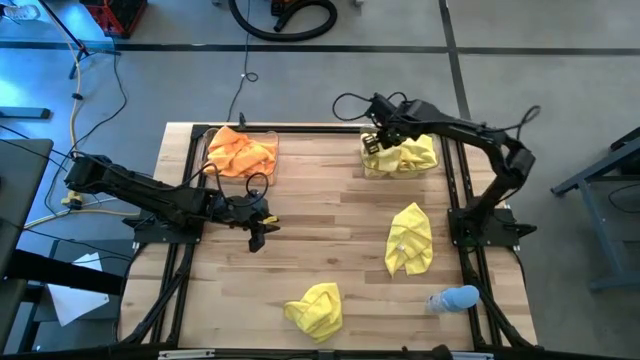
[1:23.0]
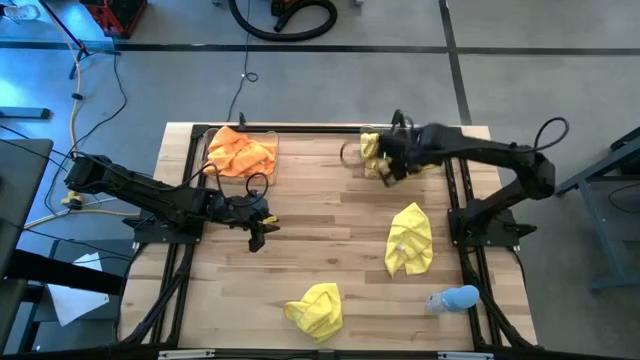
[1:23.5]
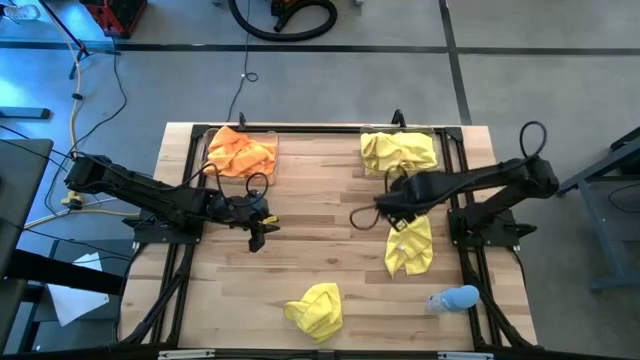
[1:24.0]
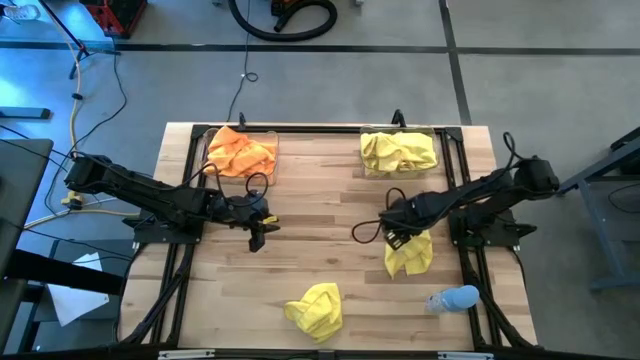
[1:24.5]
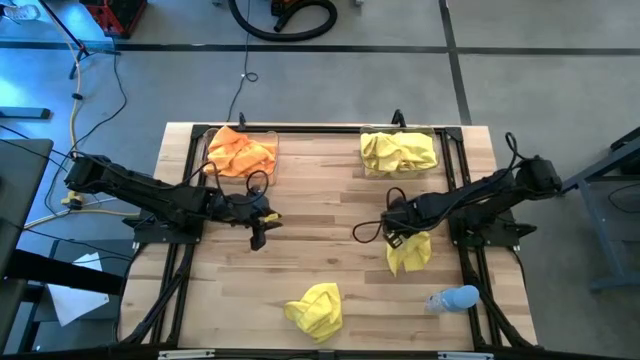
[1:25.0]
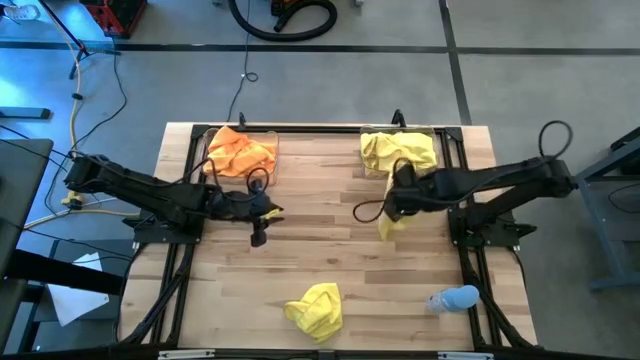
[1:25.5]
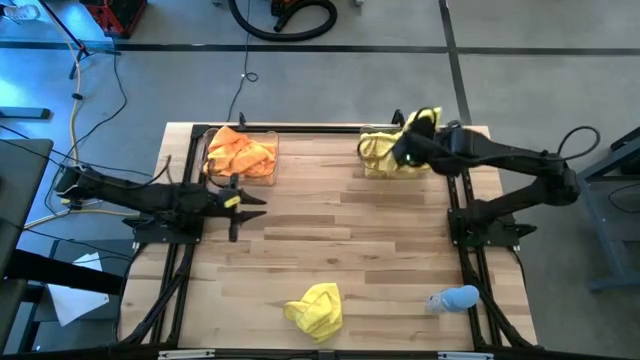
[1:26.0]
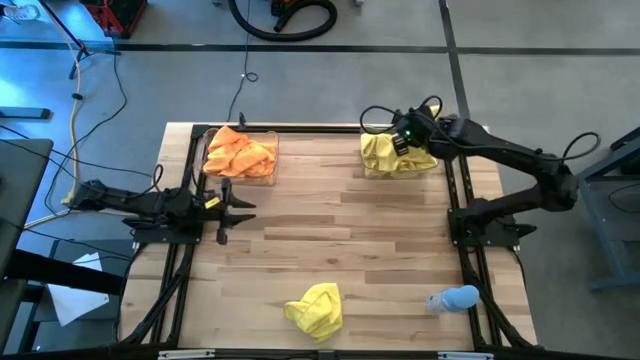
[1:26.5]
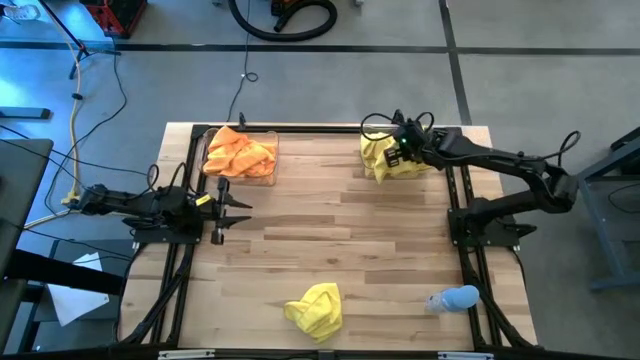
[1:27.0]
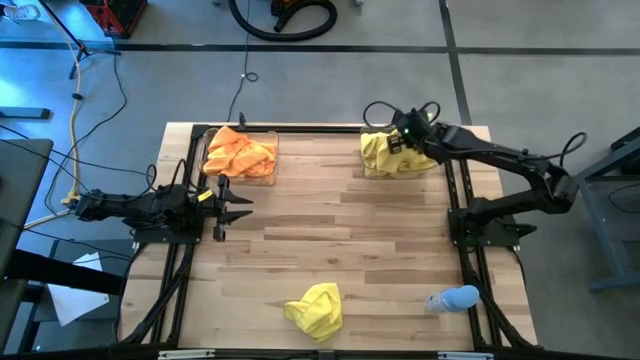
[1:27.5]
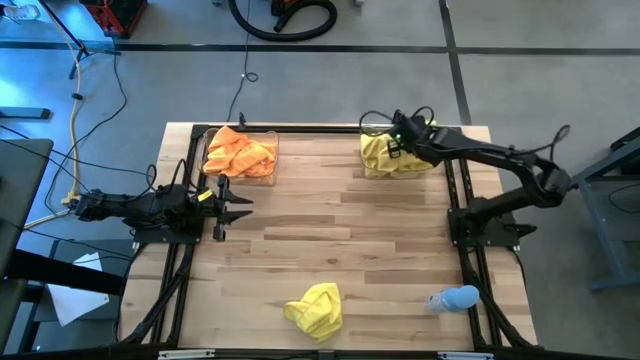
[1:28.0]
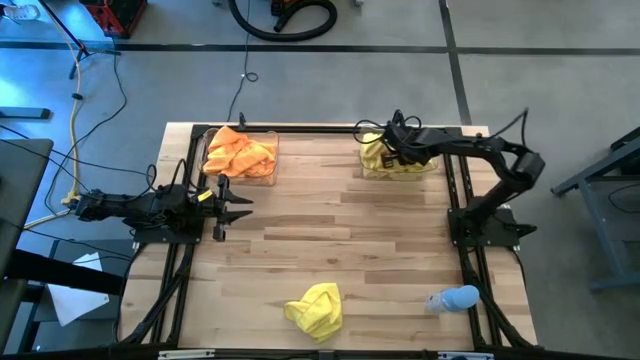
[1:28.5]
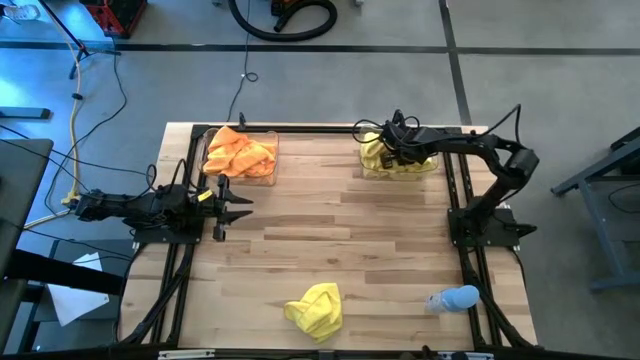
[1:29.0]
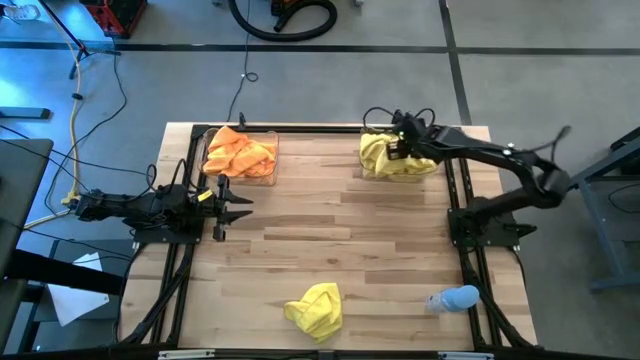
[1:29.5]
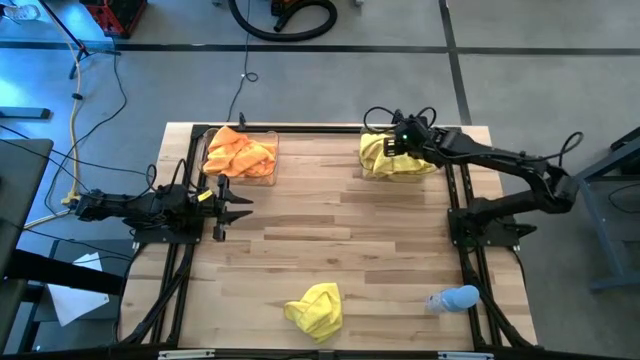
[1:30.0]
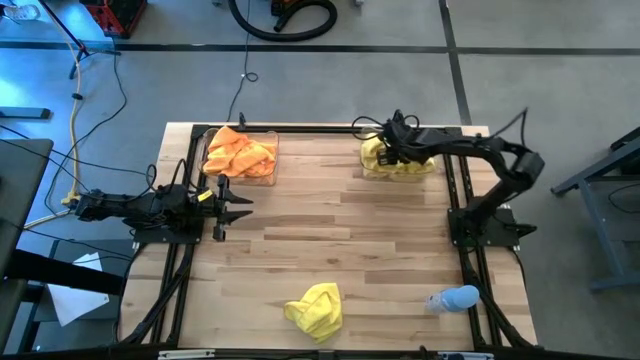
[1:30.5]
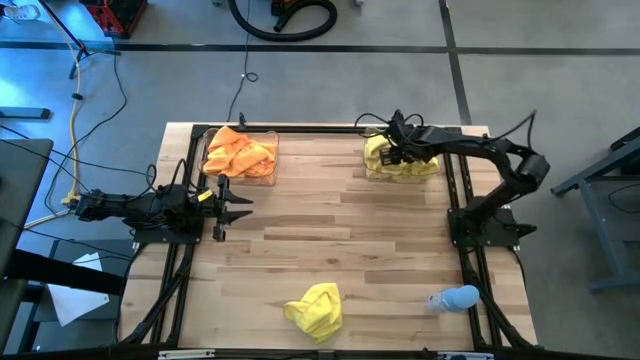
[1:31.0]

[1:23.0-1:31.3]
Task: Sort microfiber towel by color & place in baskets
Put the top yellow microfiber cloth into the right transparent bin

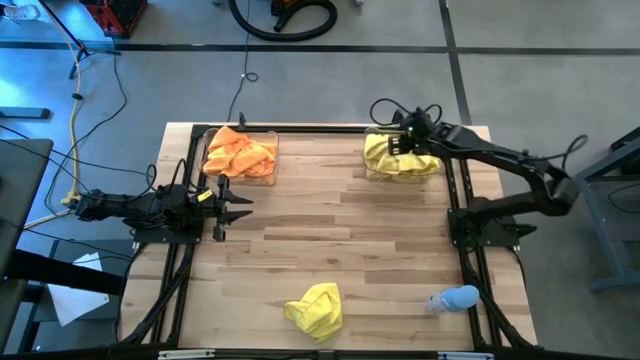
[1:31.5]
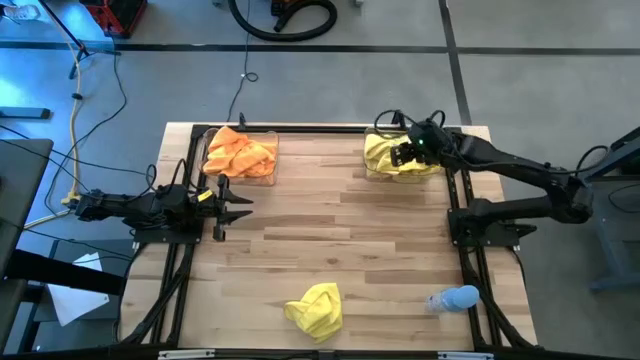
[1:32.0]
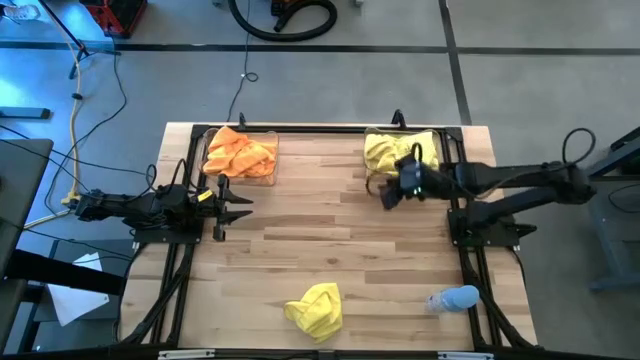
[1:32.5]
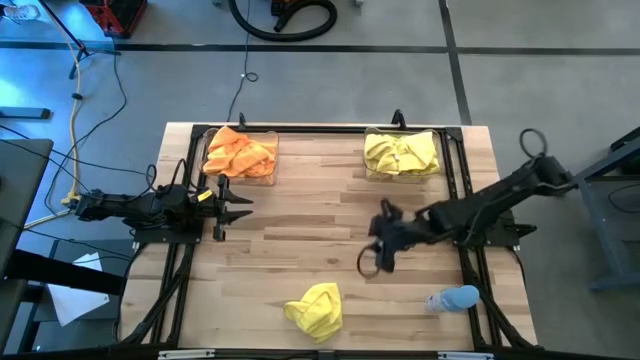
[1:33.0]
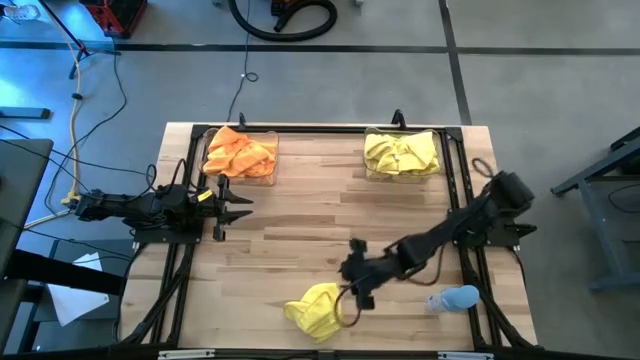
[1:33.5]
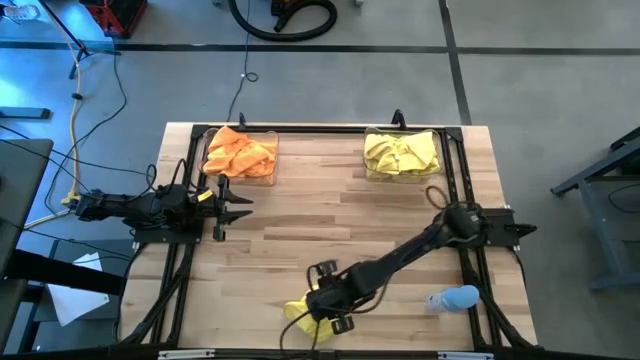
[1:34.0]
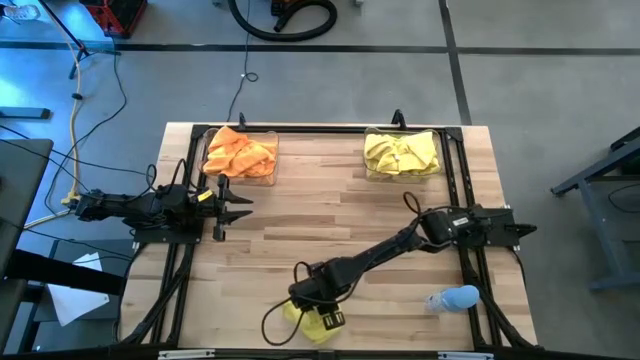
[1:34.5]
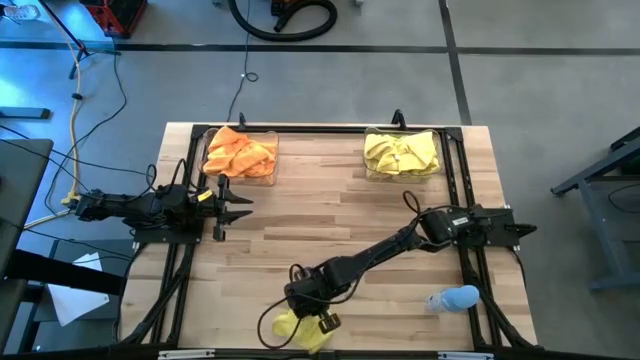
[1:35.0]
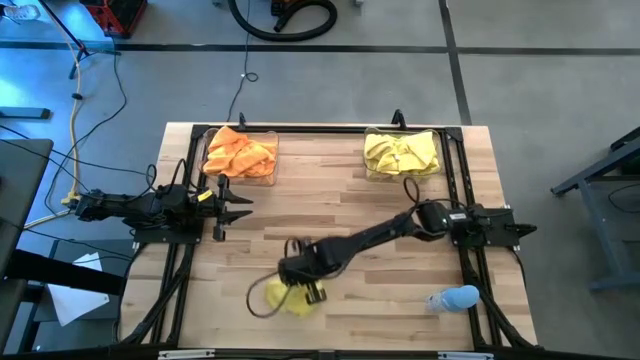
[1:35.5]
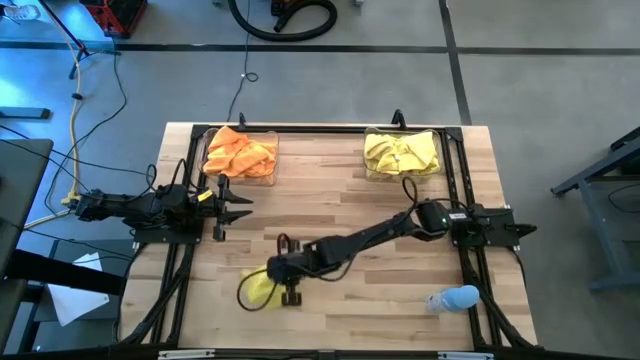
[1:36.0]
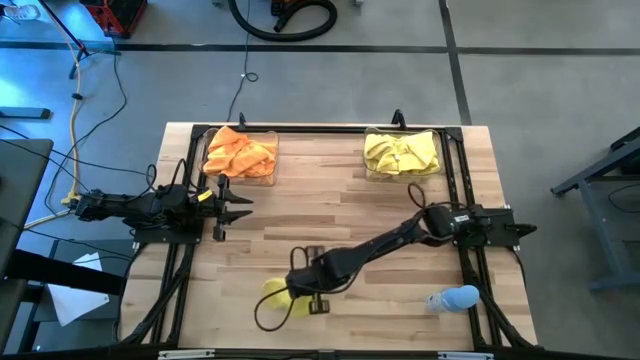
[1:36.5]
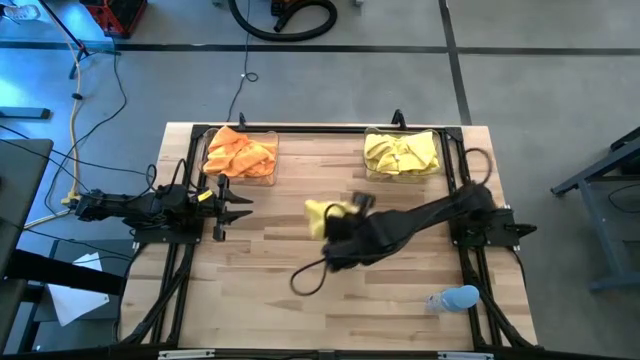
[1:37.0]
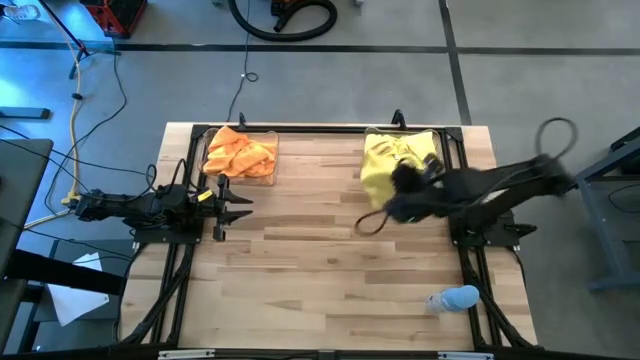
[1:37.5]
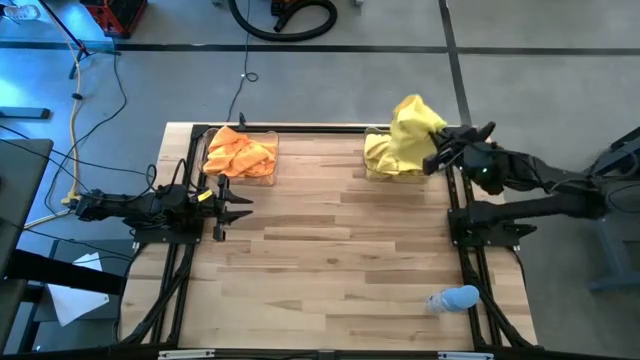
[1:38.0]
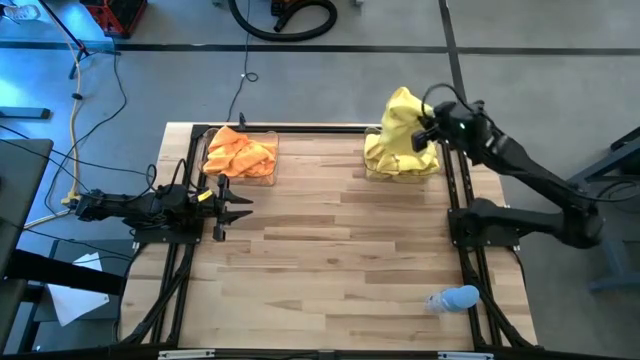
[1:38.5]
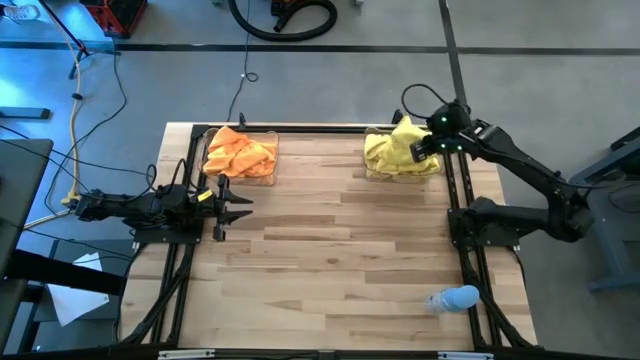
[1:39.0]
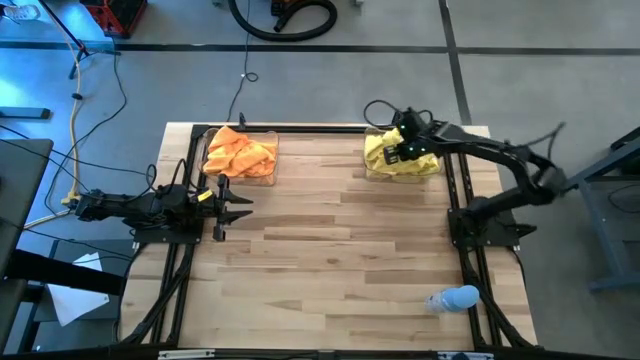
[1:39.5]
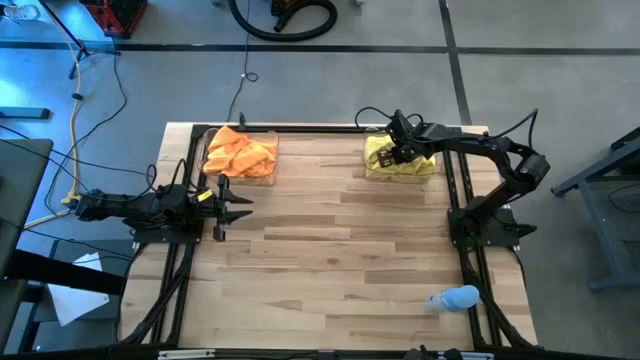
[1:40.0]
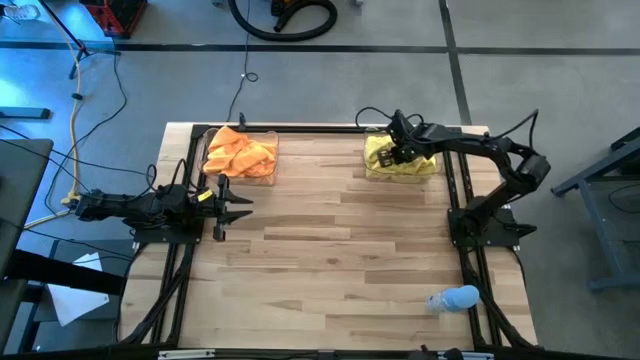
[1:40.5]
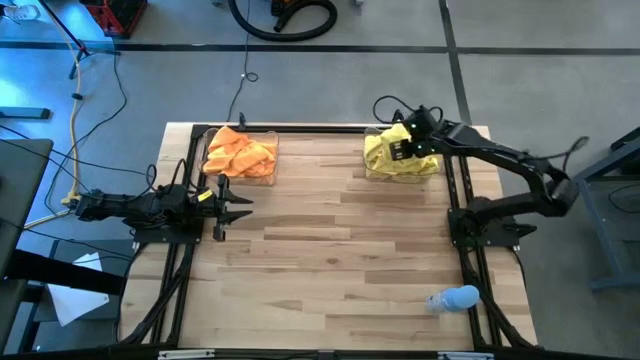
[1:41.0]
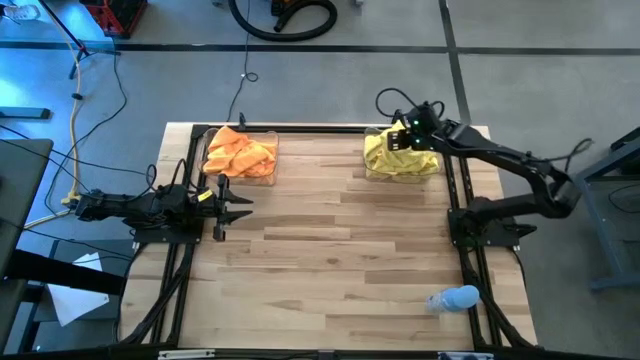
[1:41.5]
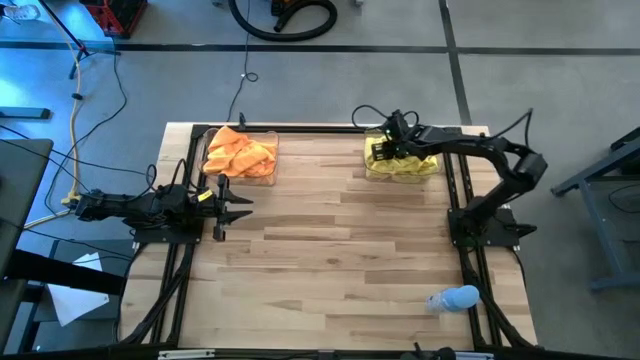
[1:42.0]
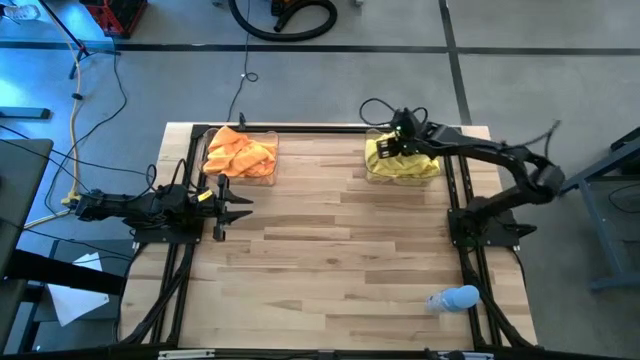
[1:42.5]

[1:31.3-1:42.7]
Put the yellow microfiber cloth into the right transparent bin

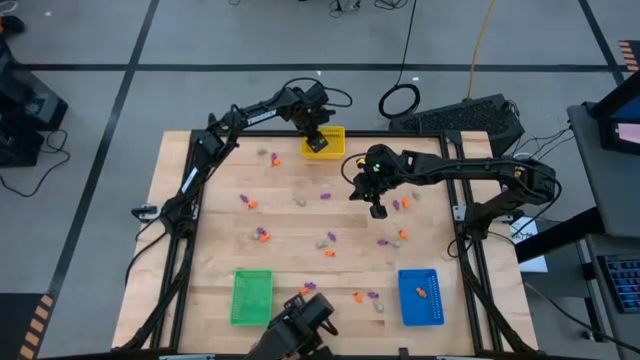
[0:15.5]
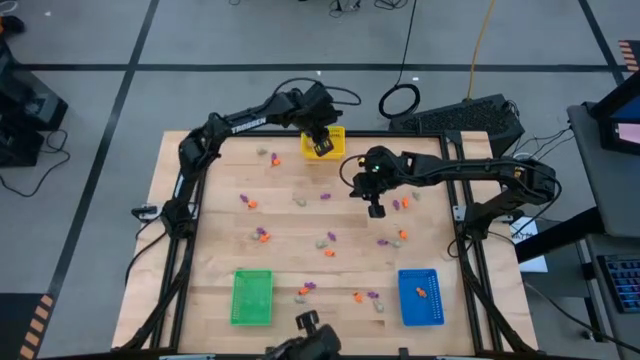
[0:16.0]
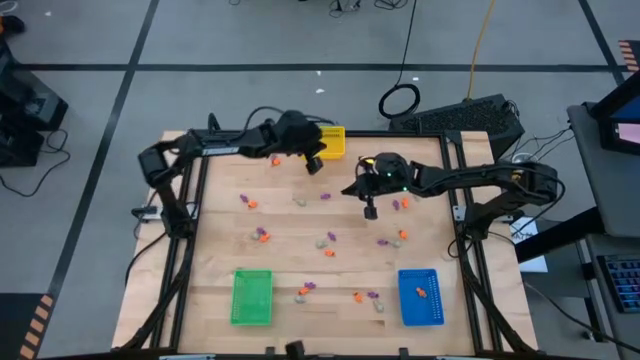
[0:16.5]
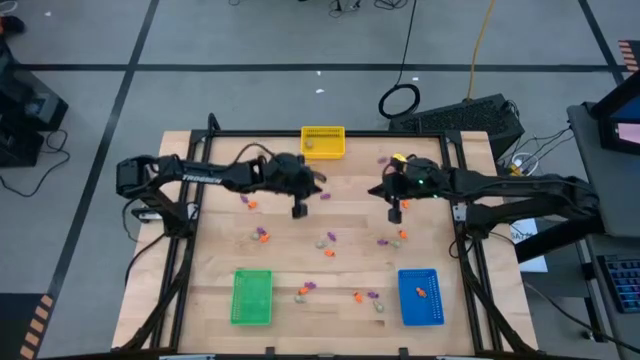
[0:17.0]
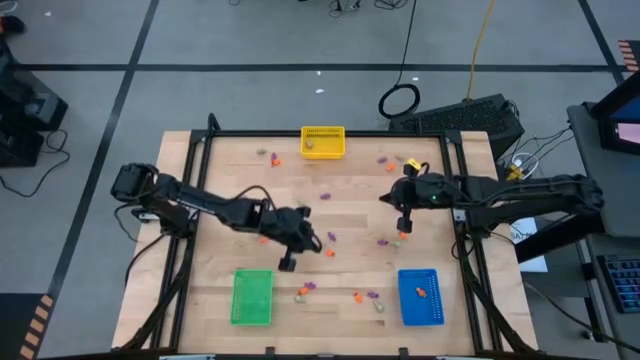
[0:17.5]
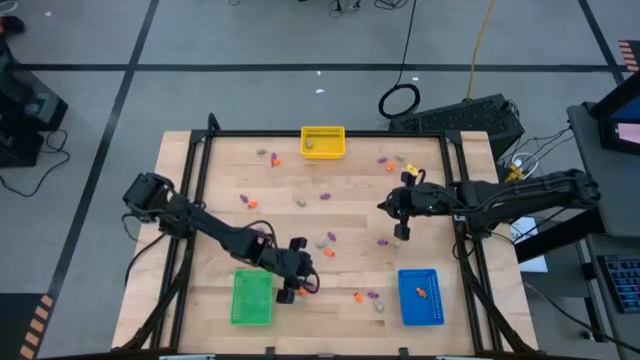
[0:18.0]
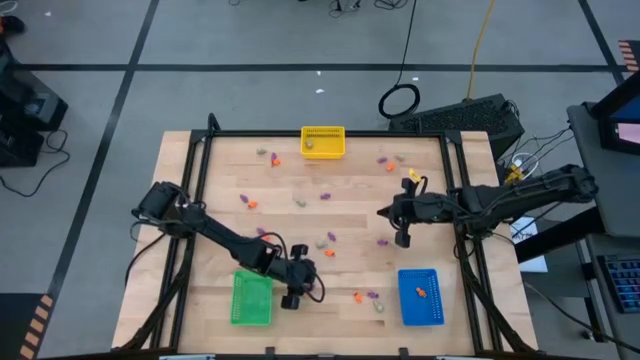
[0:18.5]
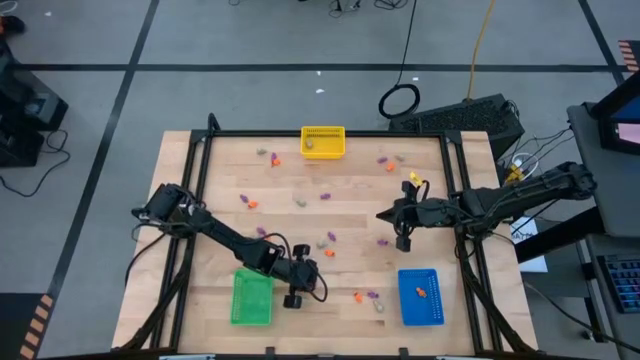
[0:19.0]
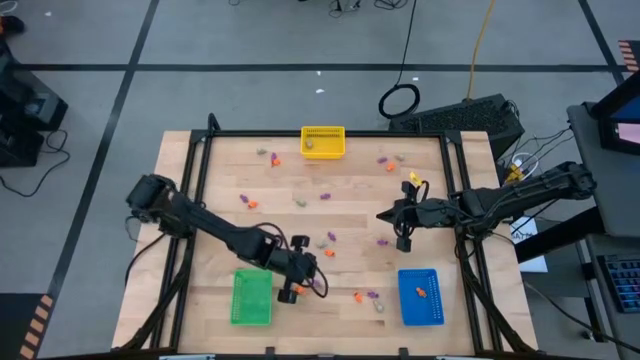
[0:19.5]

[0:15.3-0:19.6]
Task: Sort Halloween decoration
Put the purple skeleton toy into the green bin
